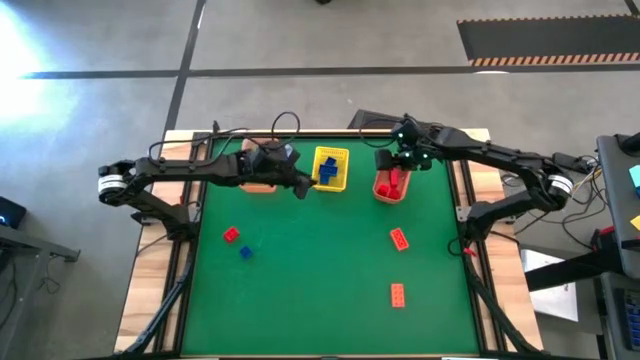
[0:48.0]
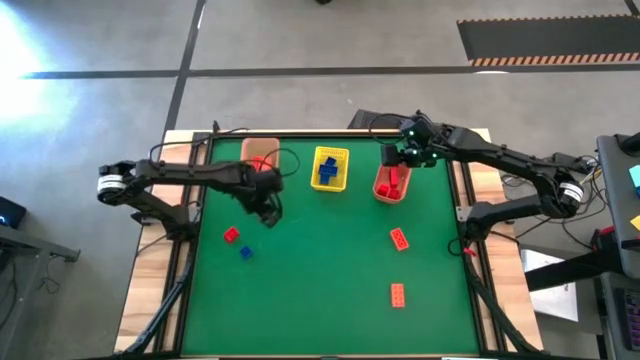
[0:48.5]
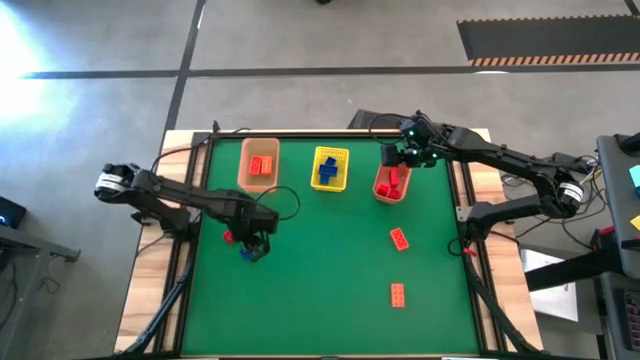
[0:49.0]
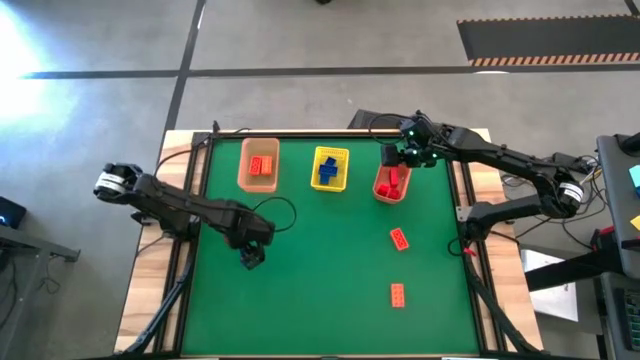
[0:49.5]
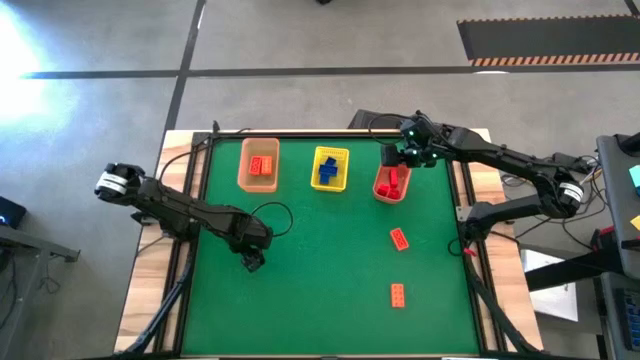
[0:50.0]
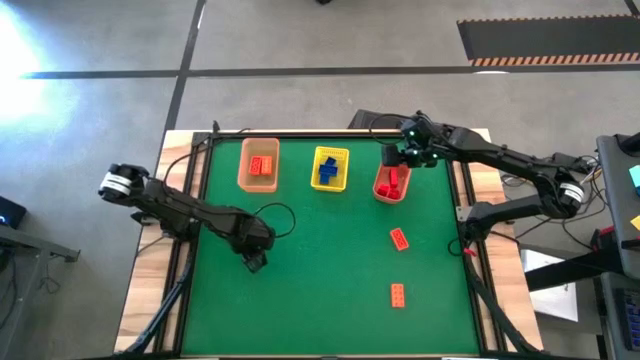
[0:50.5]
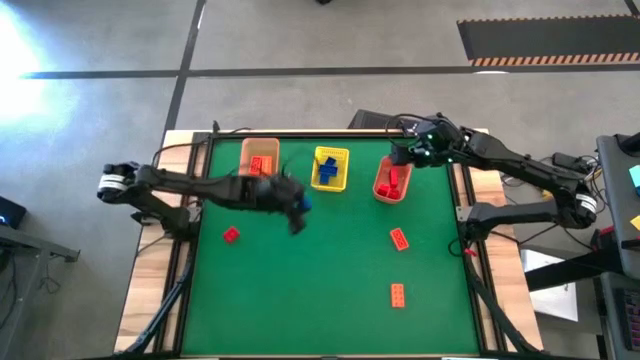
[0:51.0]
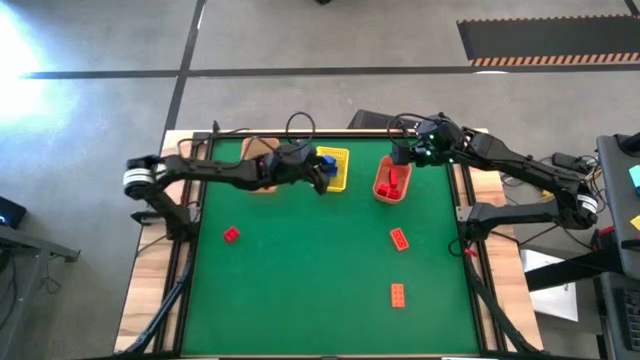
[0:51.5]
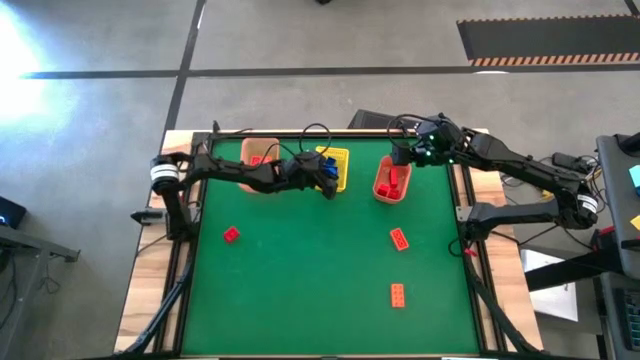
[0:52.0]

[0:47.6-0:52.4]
Task: Sort & place blocks by color
Put the blue game piece into the yellow bin

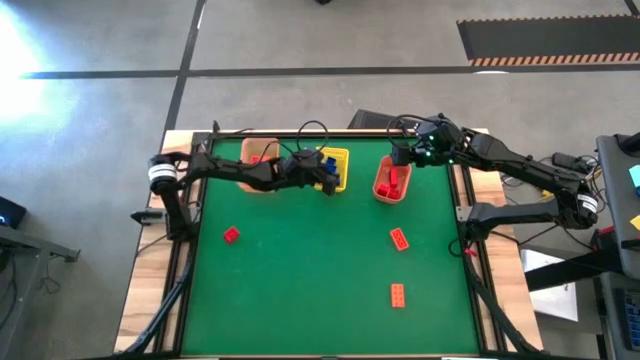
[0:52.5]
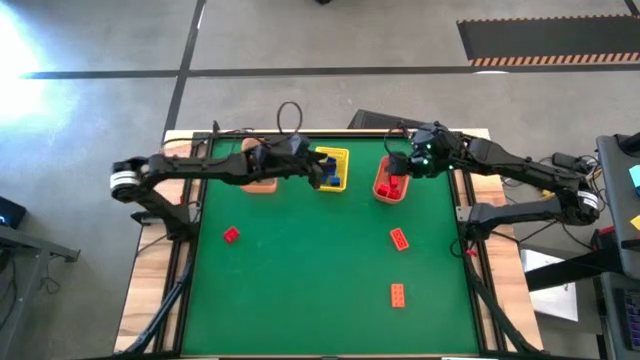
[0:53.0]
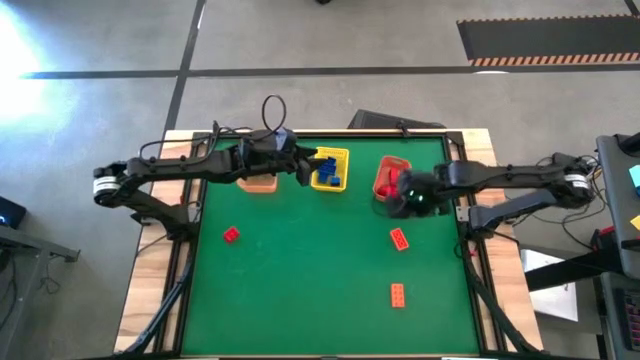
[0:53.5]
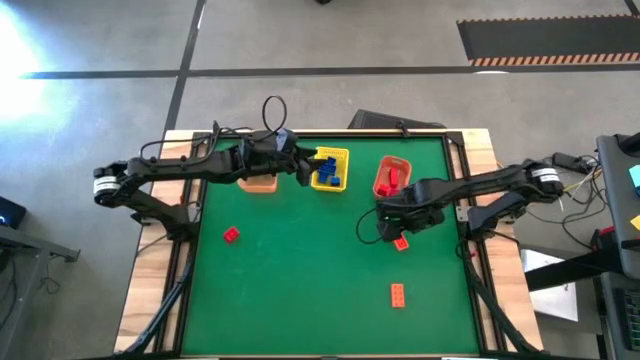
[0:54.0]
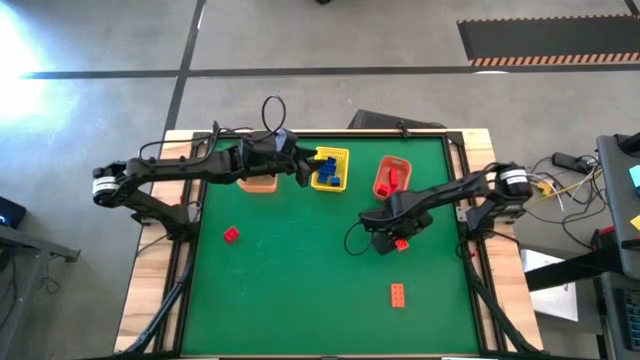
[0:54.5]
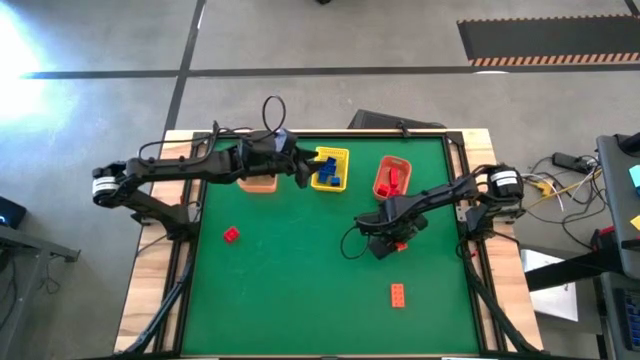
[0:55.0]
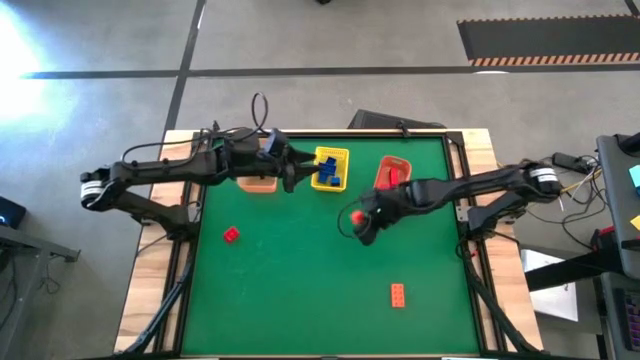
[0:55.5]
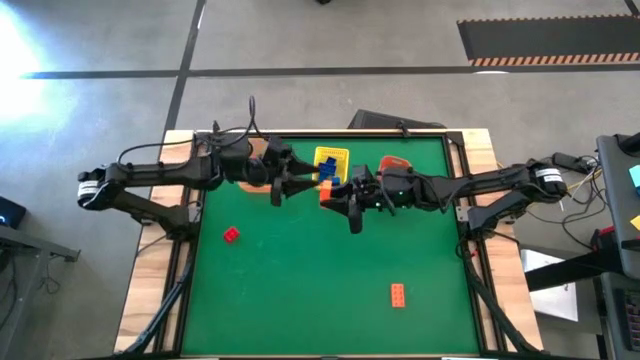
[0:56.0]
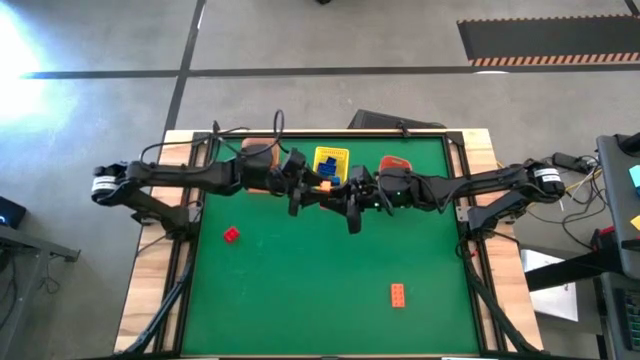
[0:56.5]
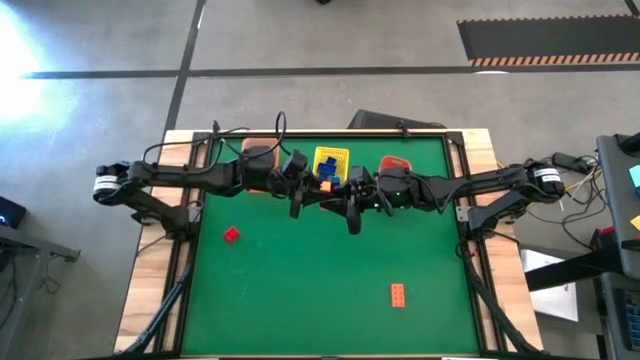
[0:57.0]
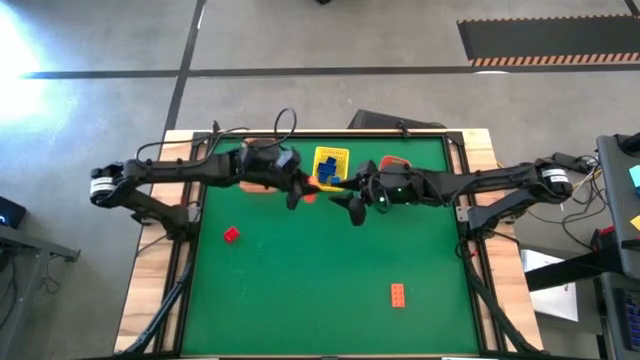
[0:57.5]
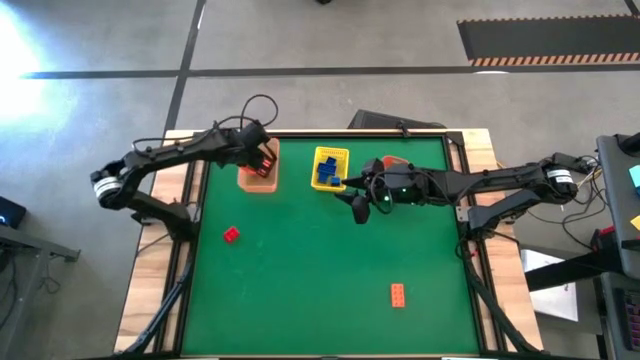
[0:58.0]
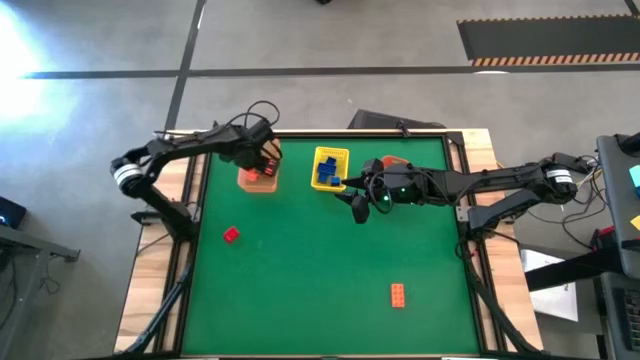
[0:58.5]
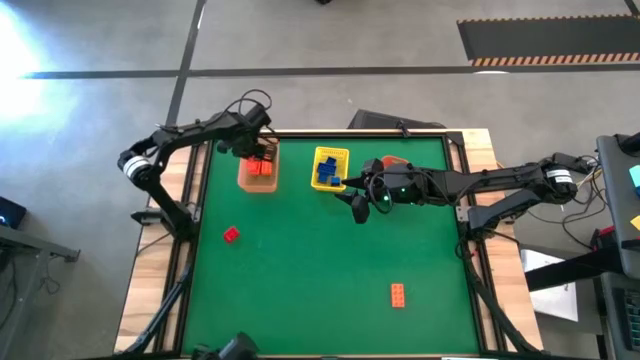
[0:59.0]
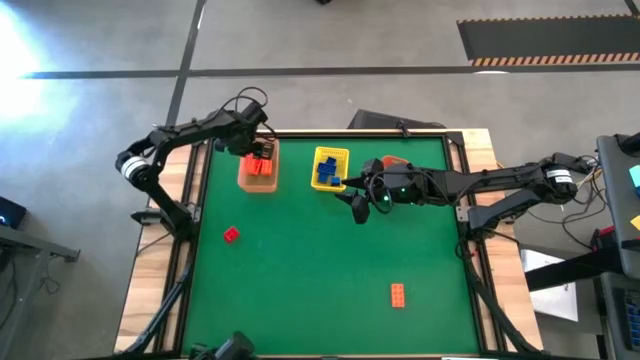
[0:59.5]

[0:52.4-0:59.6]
Put the orange game piece into the light orange bin

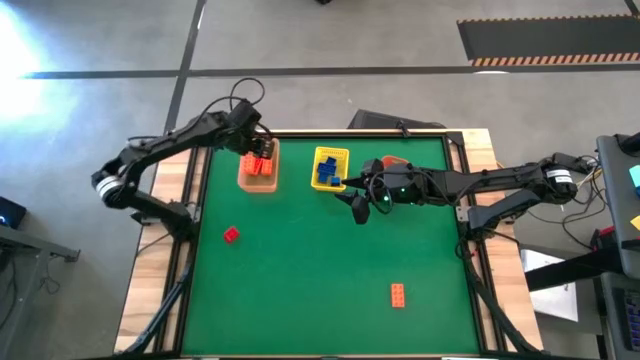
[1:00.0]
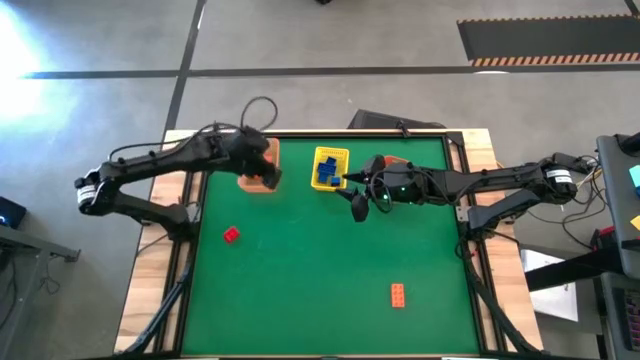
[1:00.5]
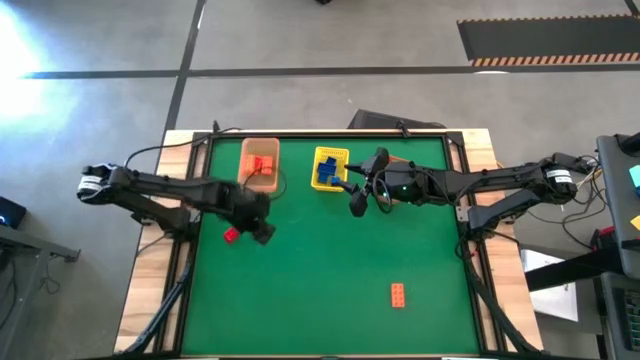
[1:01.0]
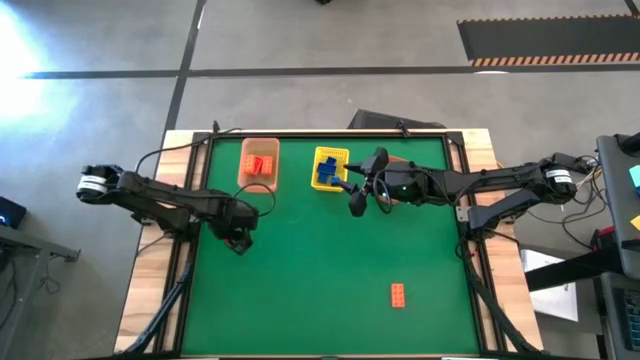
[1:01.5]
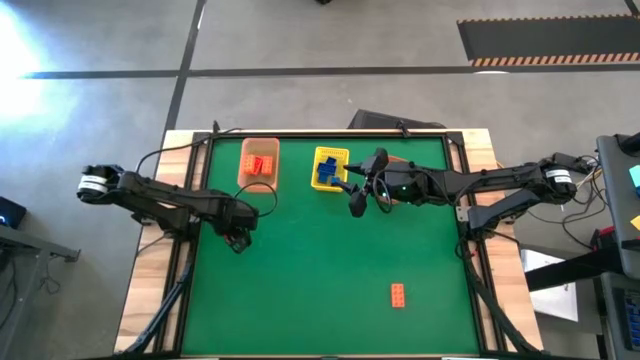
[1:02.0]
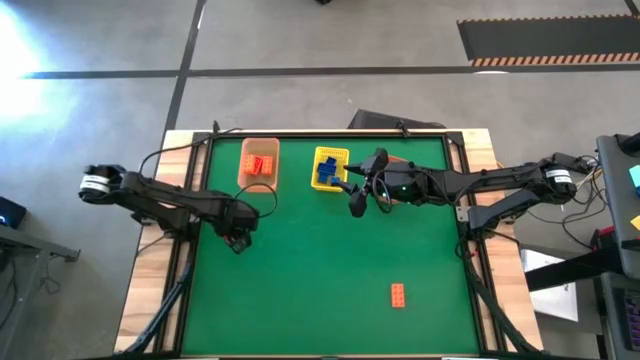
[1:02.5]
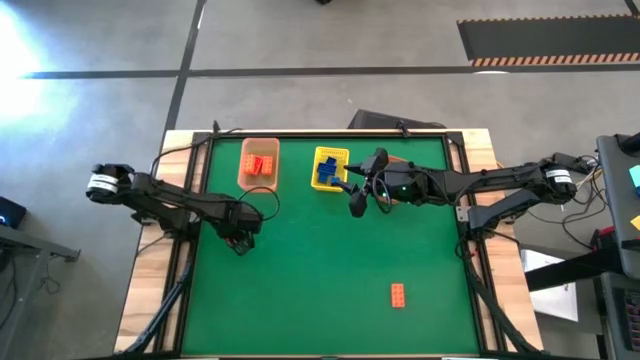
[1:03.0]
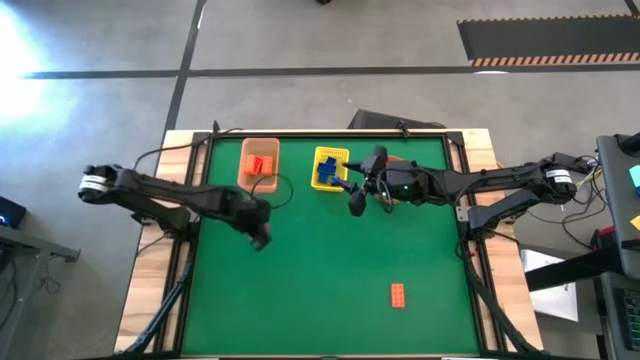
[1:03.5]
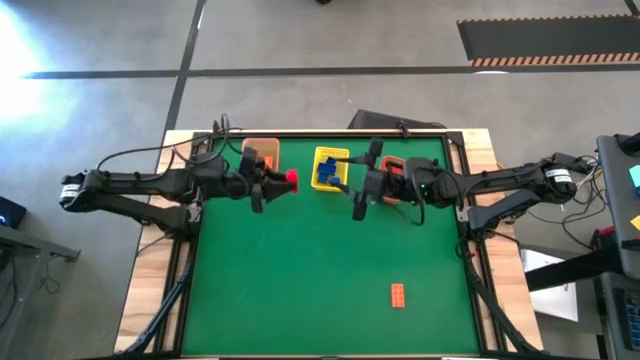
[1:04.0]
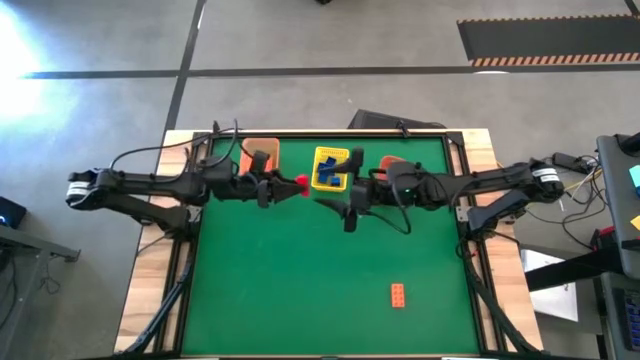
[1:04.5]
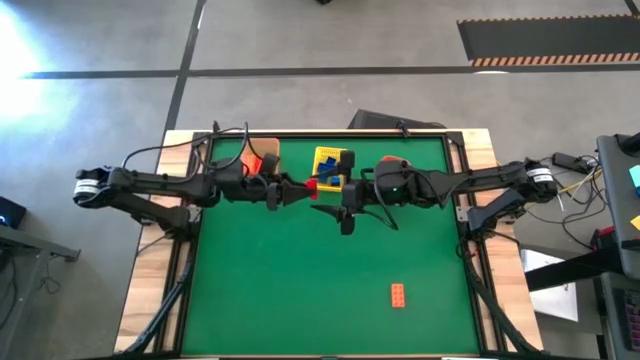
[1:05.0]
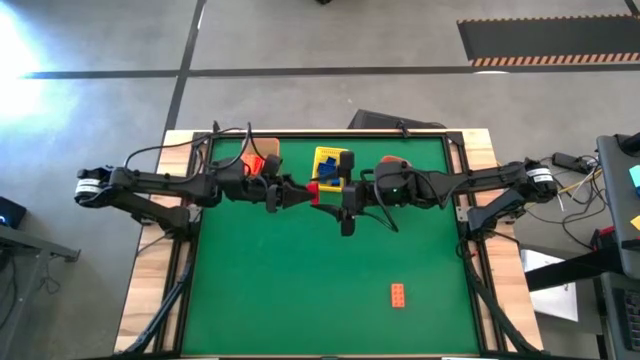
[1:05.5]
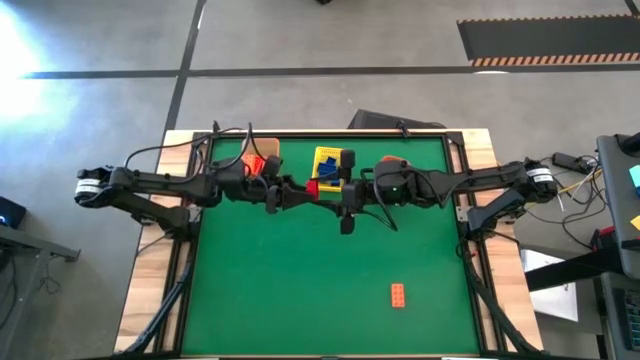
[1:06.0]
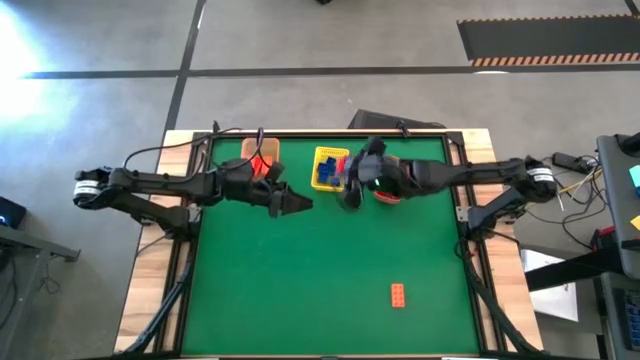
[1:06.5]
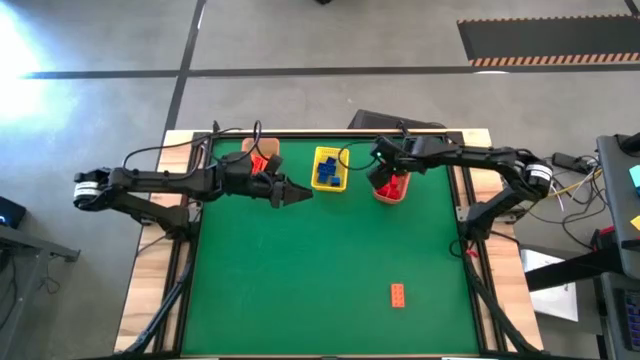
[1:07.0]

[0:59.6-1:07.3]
Put the red game piece into the orange bin

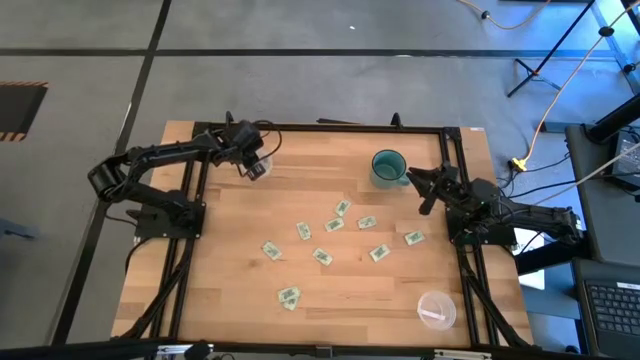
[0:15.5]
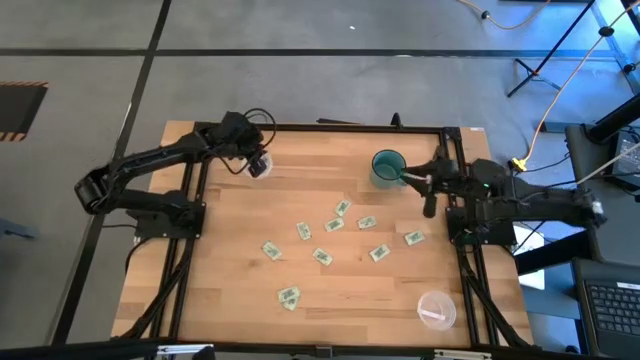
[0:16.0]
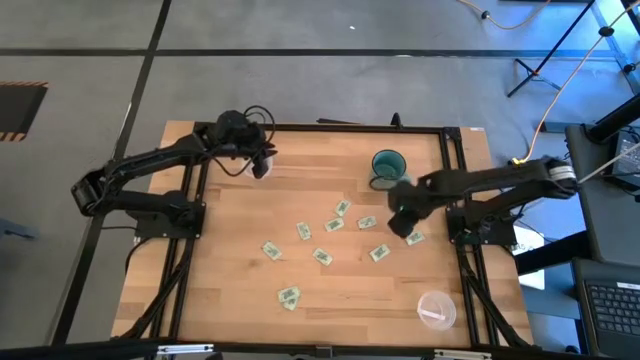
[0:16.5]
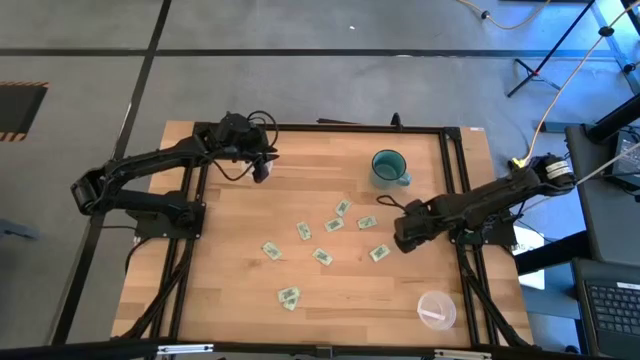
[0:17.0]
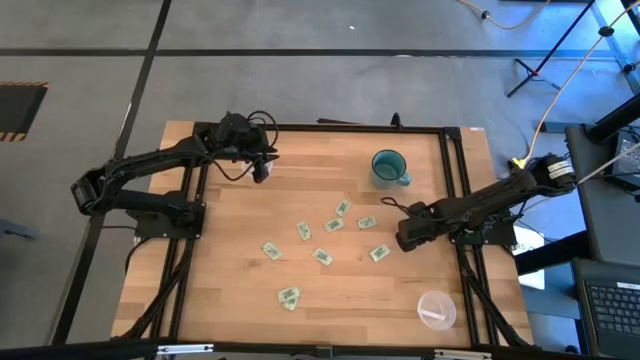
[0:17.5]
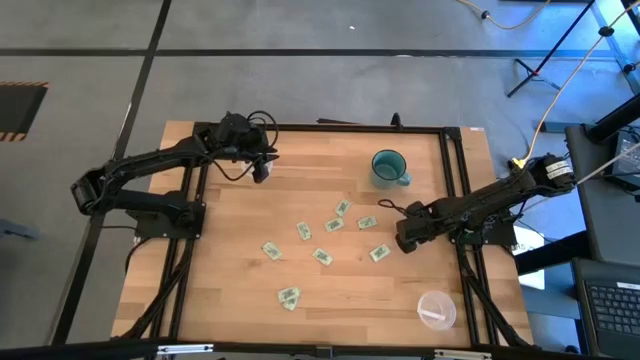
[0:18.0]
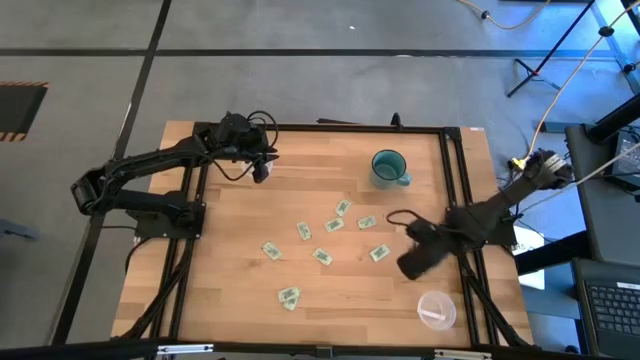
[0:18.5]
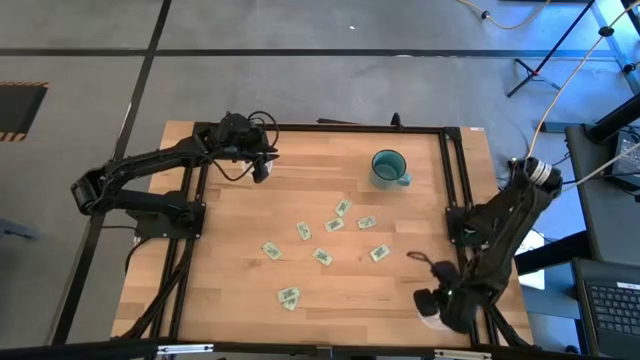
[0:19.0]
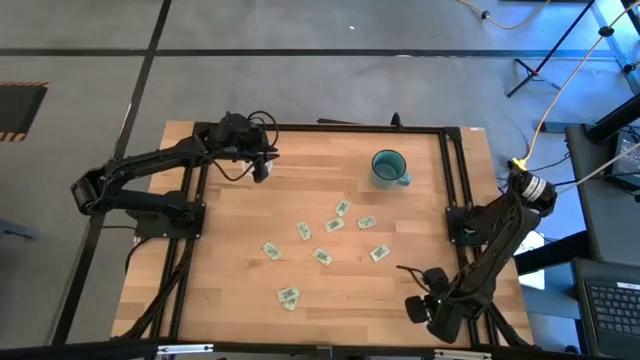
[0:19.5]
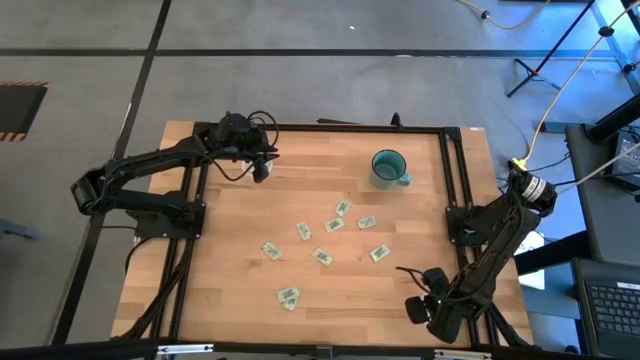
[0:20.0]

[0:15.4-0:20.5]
Task: Pick and place Stevia / Truvia into bins
Put the stevia packet into the bottom transparent container
